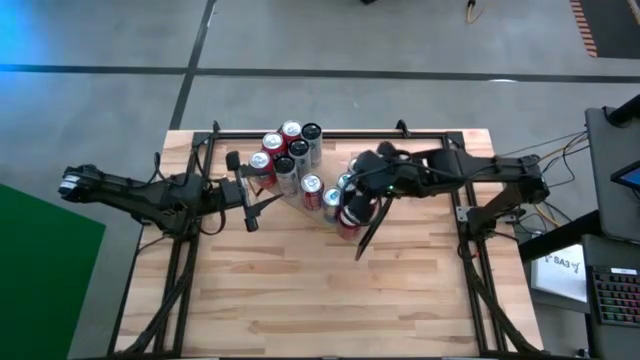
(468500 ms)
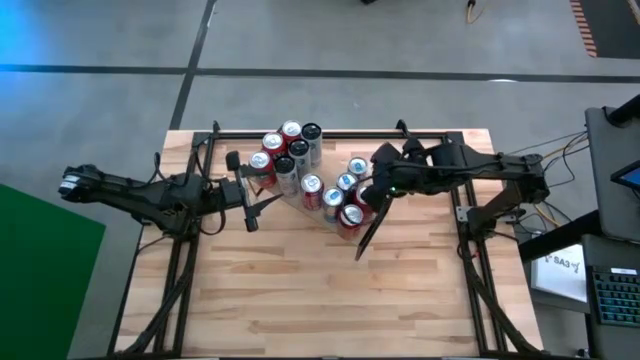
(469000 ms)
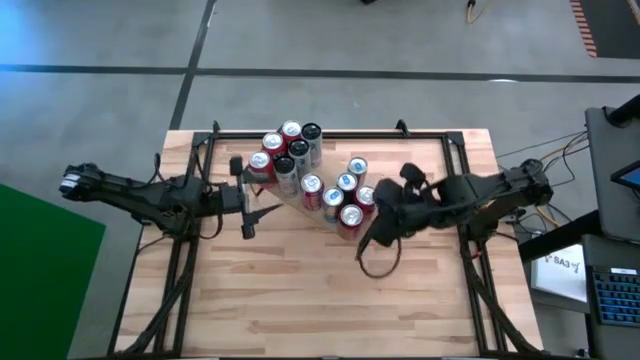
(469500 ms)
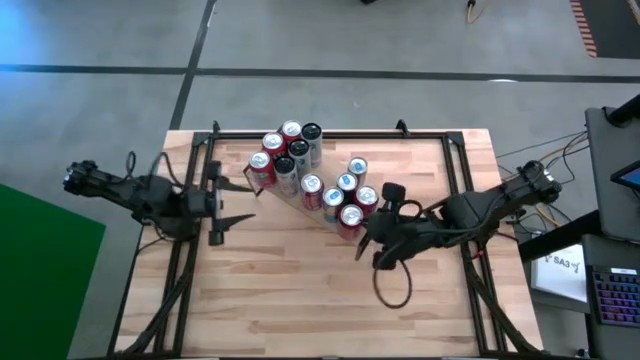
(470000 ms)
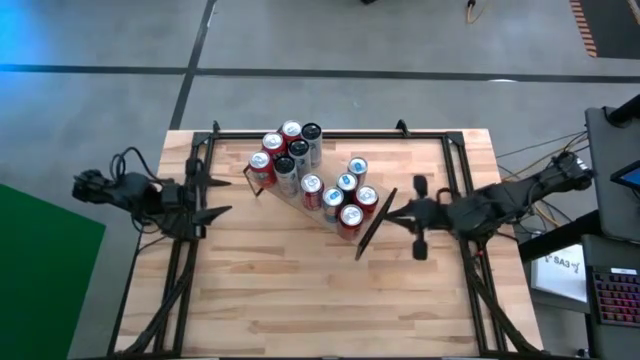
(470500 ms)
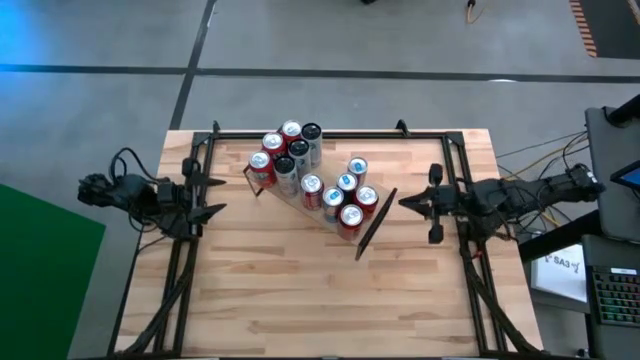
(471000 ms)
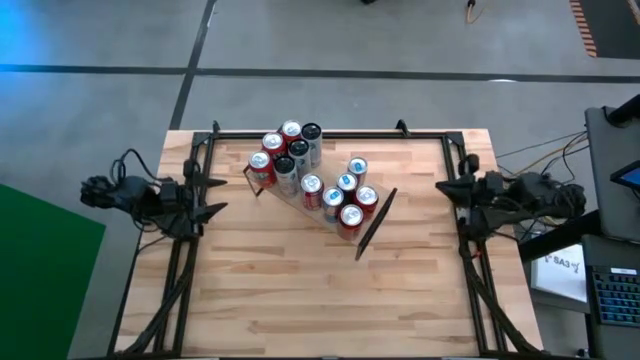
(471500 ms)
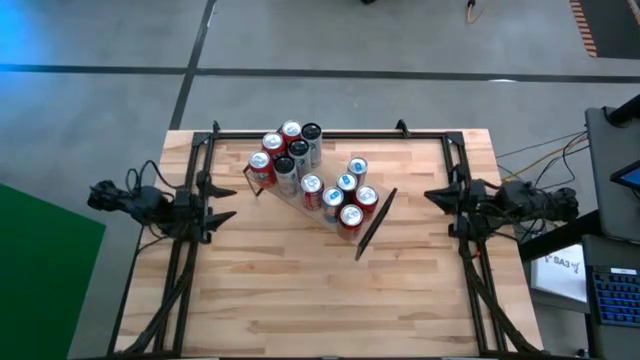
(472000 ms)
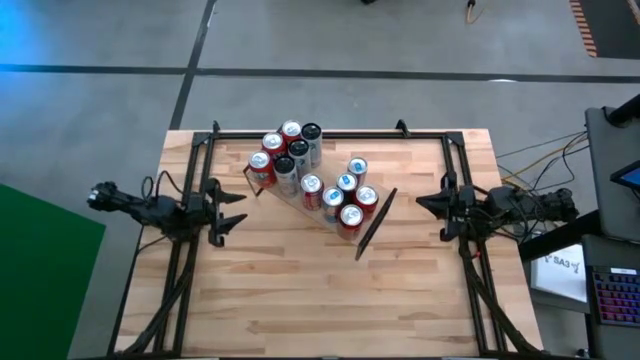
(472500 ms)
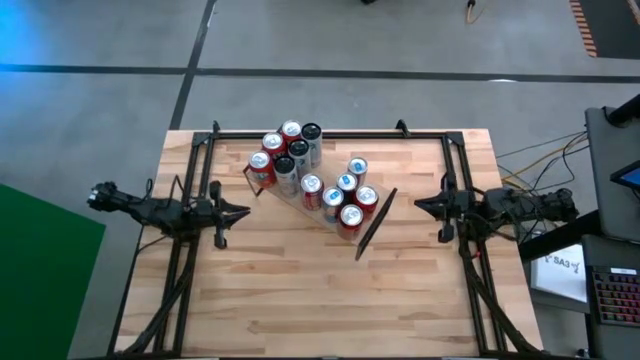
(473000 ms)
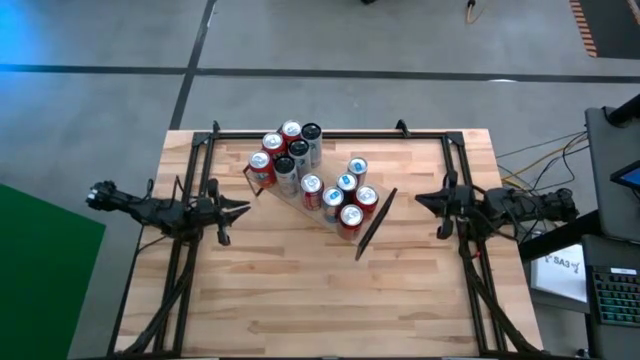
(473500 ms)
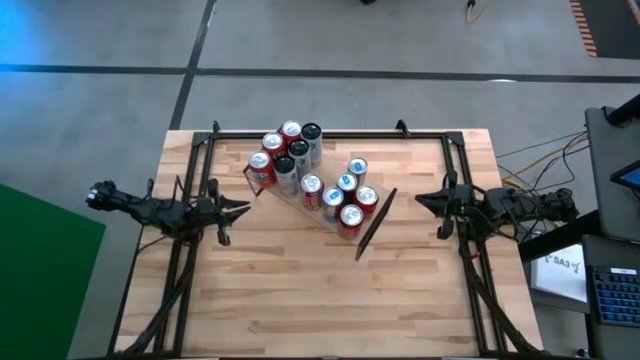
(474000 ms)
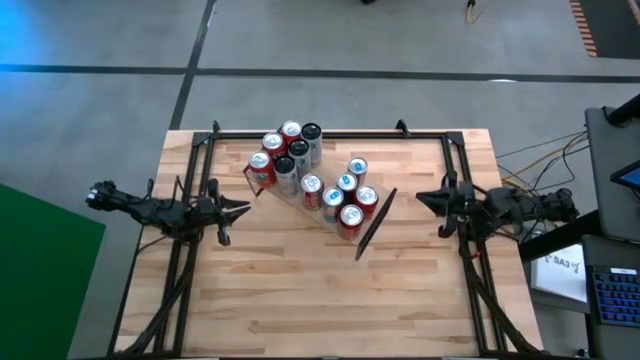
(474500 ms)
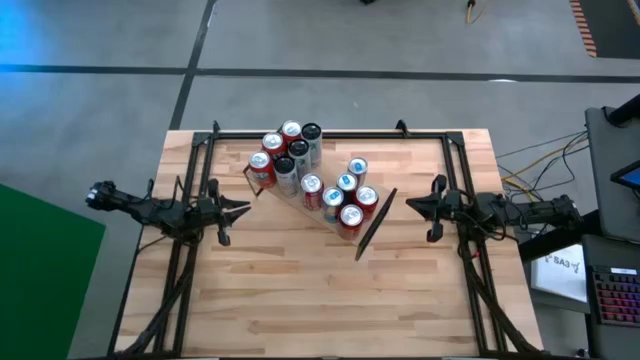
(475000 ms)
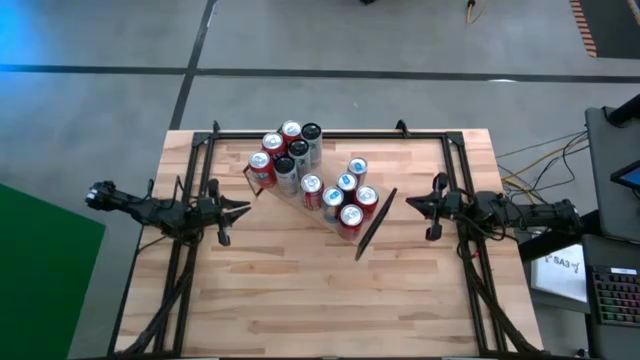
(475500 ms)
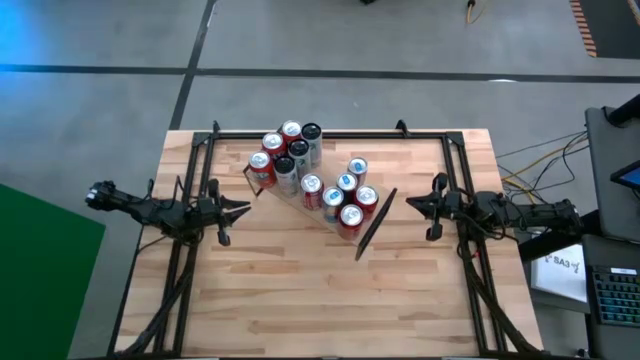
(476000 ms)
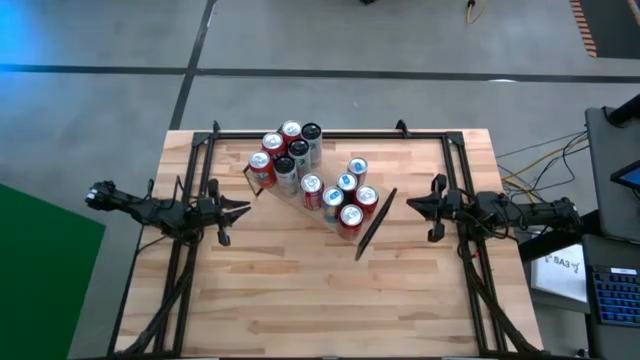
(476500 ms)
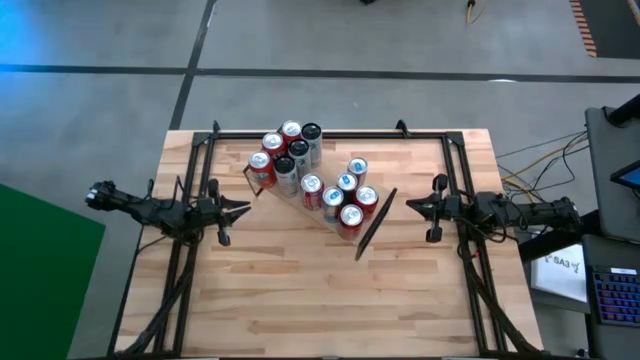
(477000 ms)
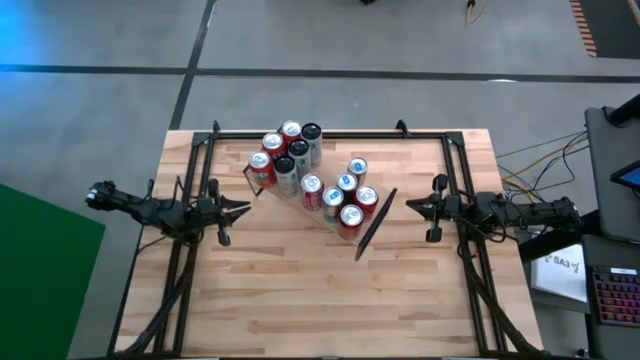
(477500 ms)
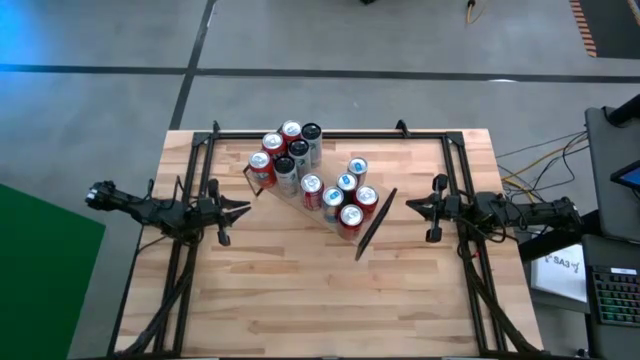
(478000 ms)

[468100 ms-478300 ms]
Task: Place canned beverage on shelf
Return to Home Position

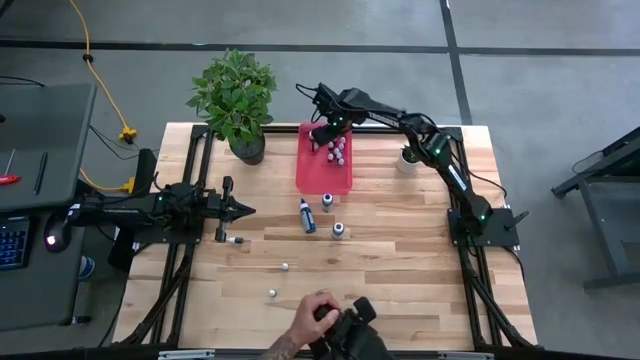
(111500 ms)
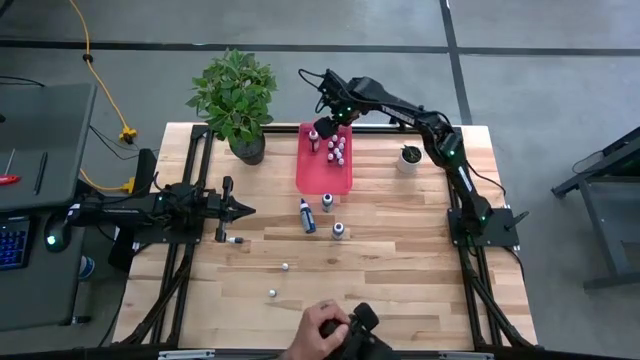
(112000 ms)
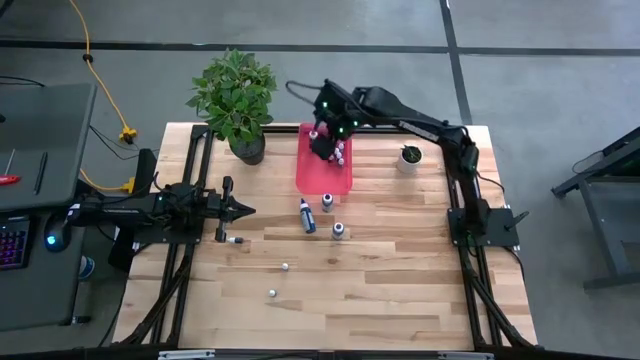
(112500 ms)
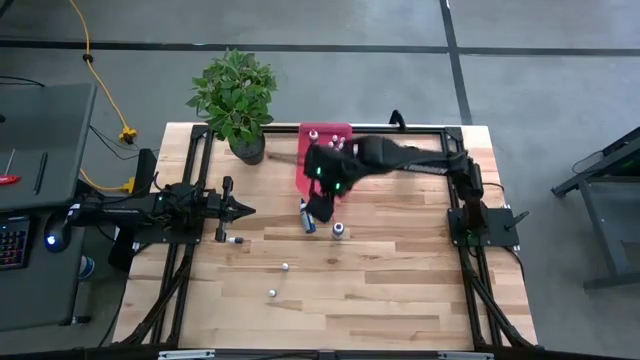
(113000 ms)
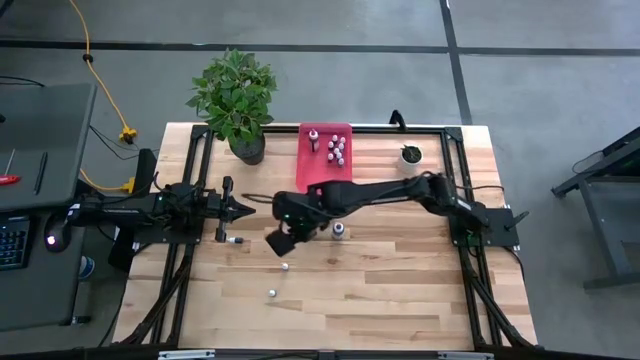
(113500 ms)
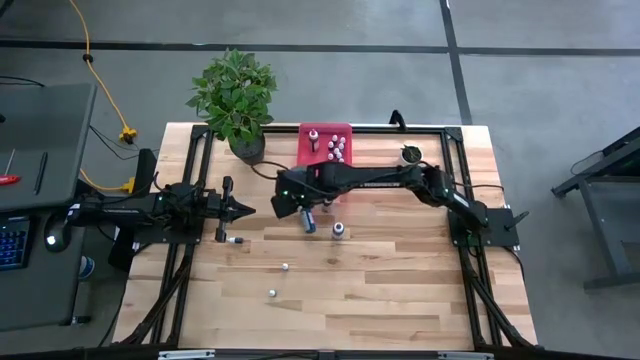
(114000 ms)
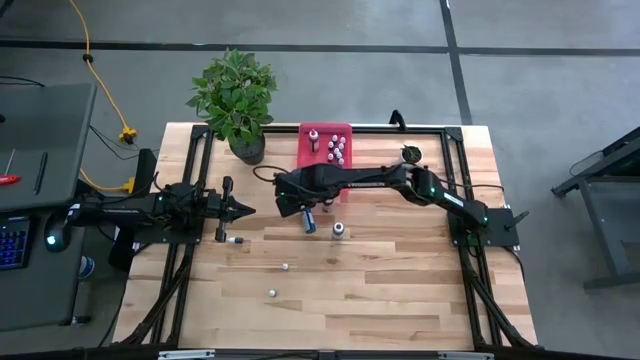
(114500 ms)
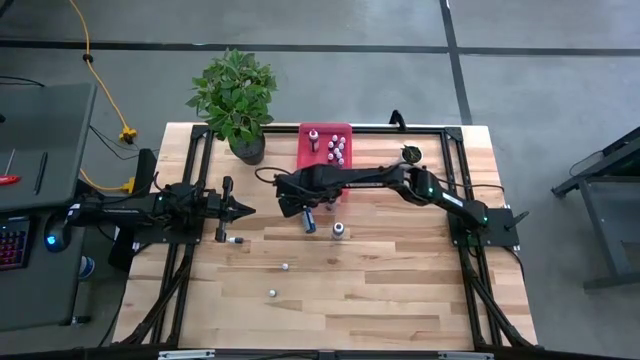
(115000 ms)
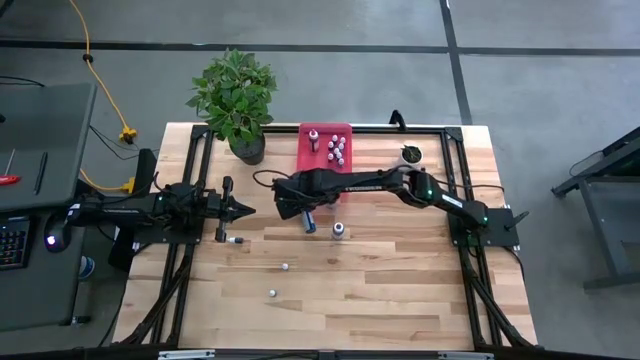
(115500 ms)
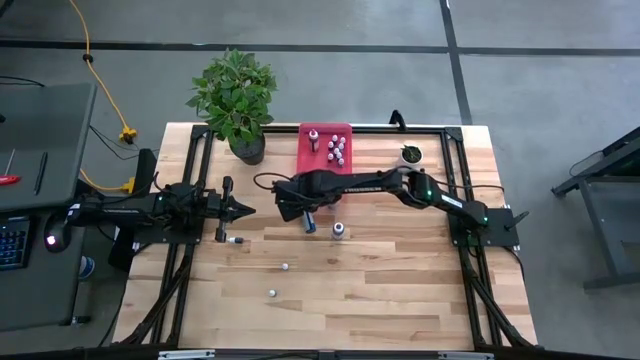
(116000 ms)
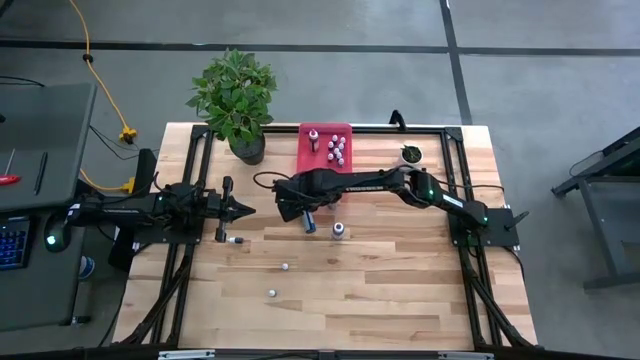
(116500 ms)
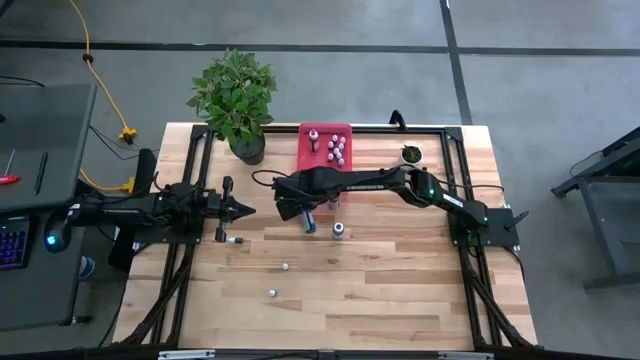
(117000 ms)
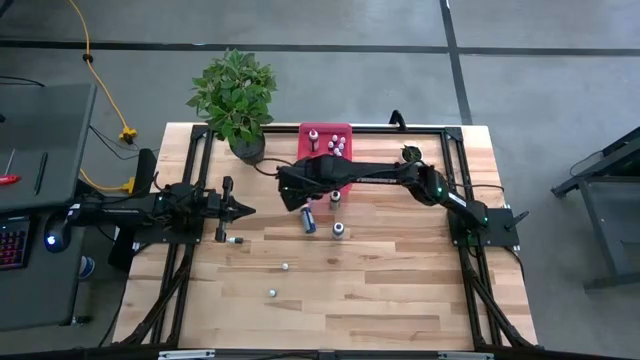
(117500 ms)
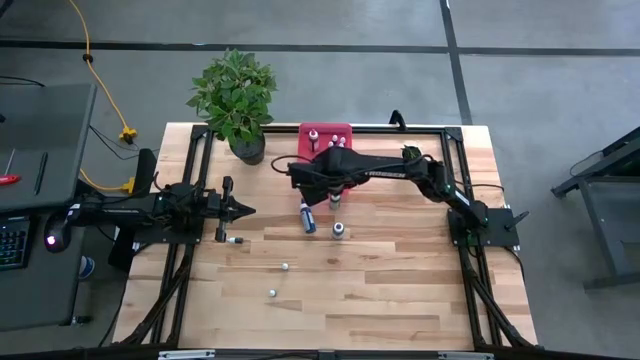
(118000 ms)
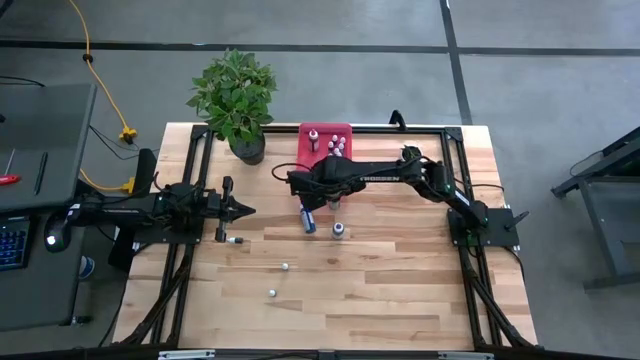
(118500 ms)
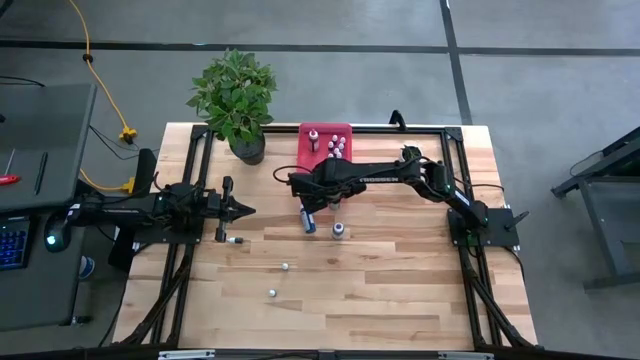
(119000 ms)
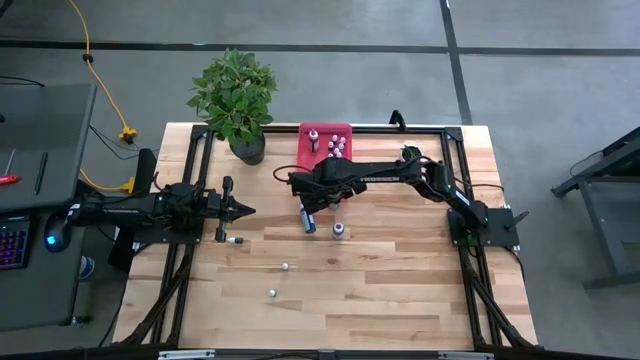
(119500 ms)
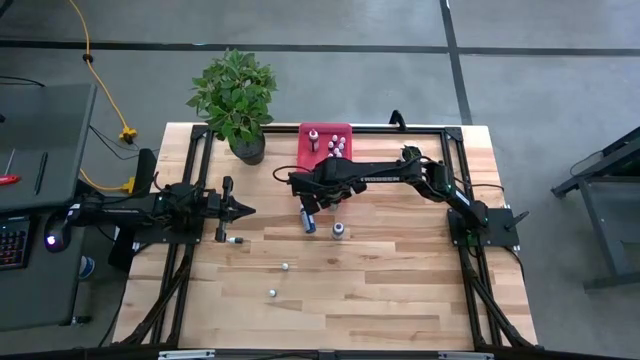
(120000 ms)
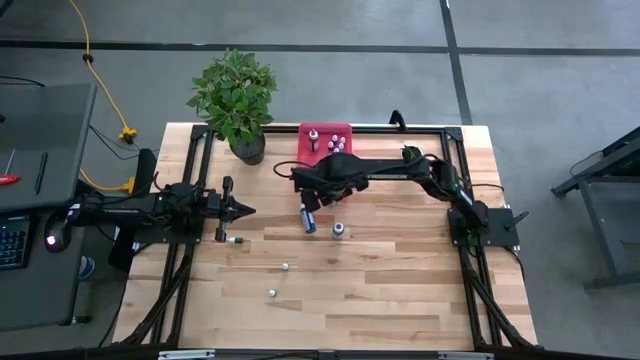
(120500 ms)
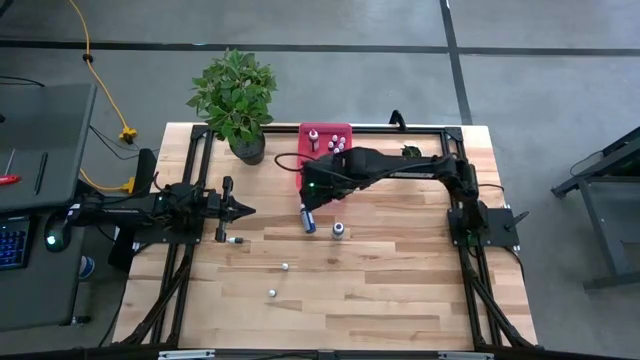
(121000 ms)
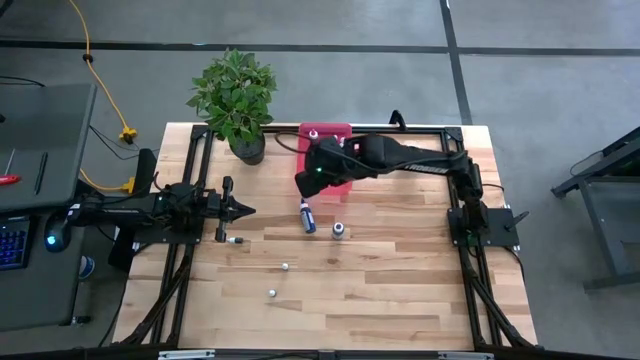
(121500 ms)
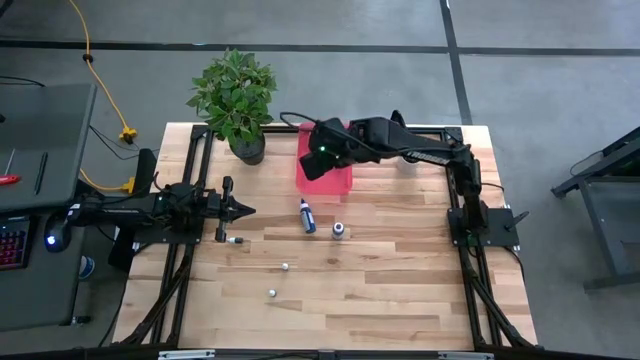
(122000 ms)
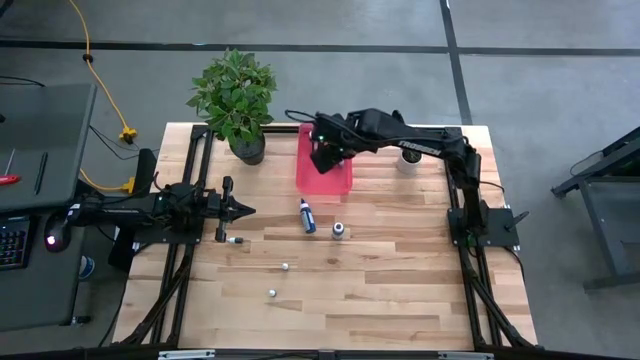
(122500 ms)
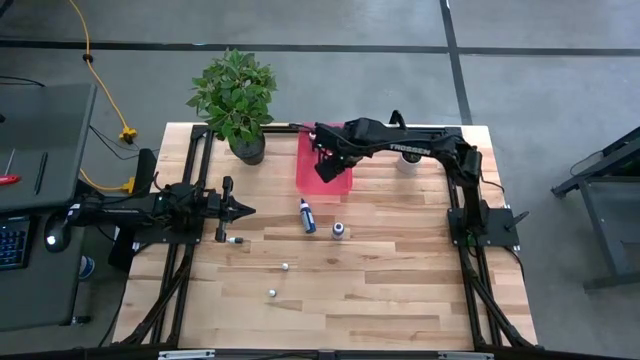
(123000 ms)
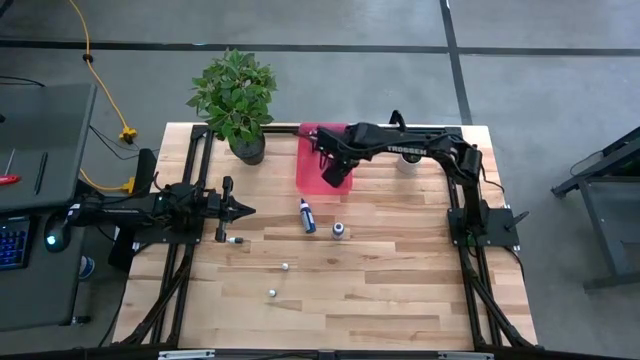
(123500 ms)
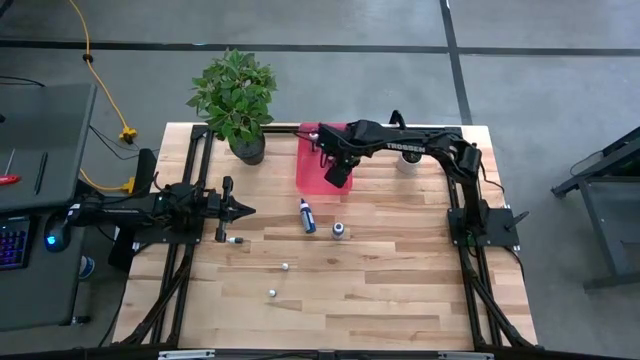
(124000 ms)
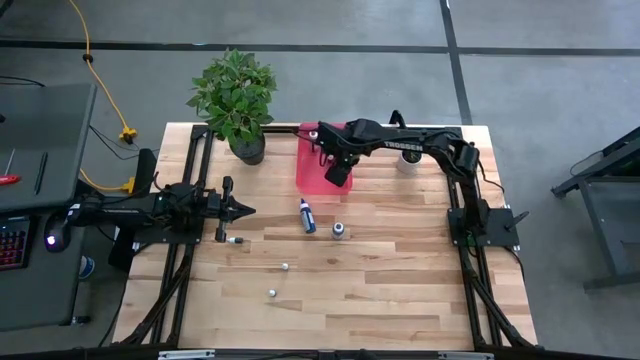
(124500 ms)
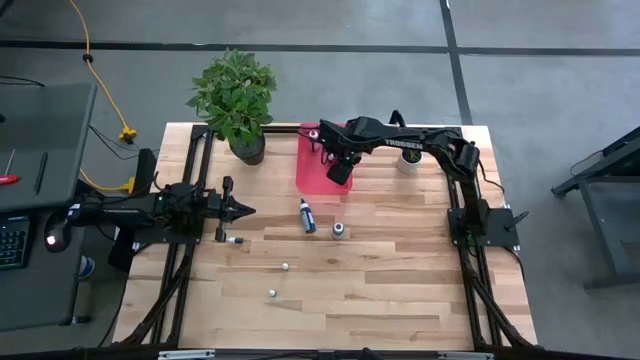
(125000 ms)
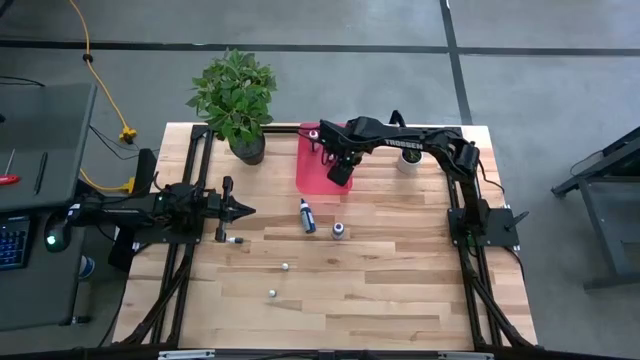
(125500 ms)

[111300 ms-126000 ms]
Task: Pick & Place food coloring
Put the black food coloring bottle into the pink bin
